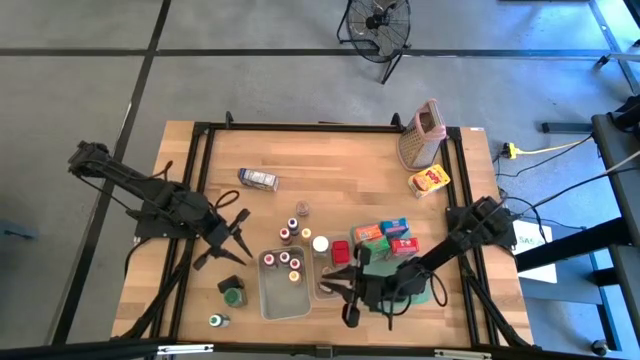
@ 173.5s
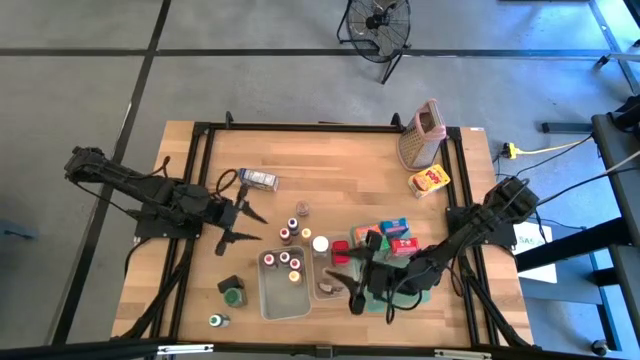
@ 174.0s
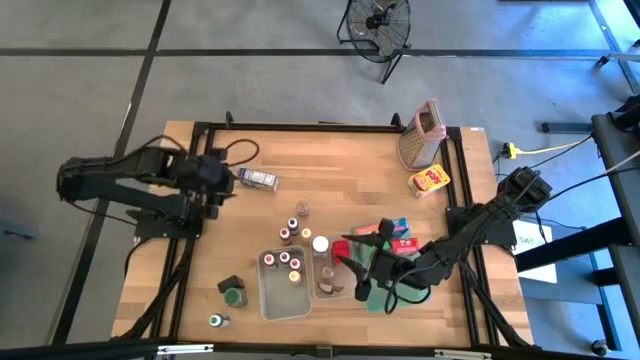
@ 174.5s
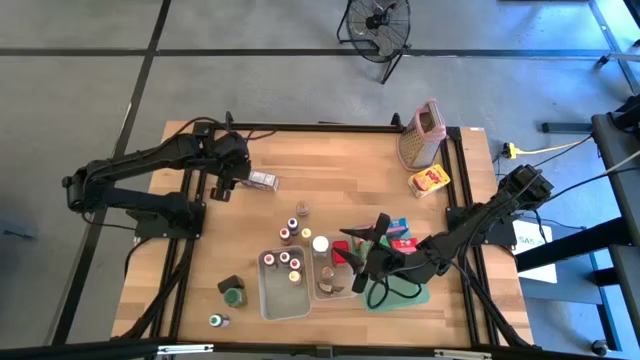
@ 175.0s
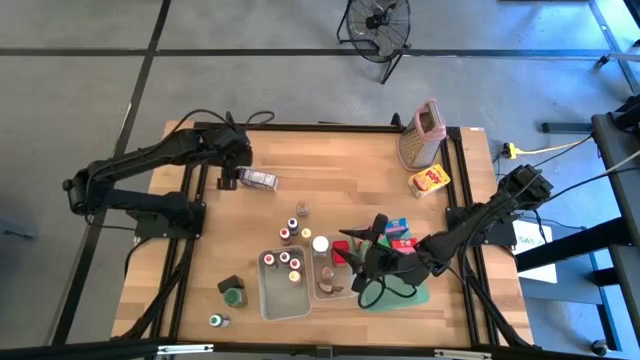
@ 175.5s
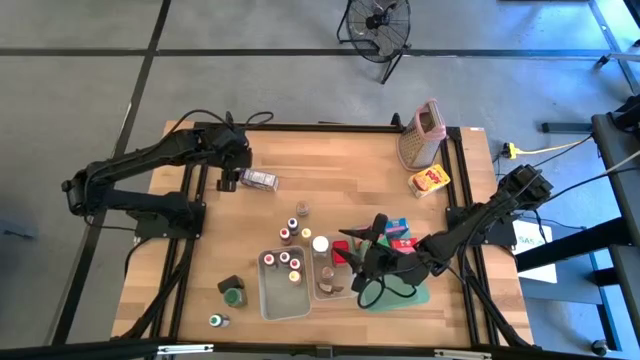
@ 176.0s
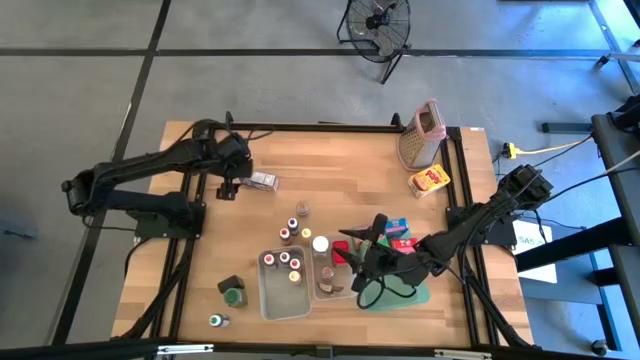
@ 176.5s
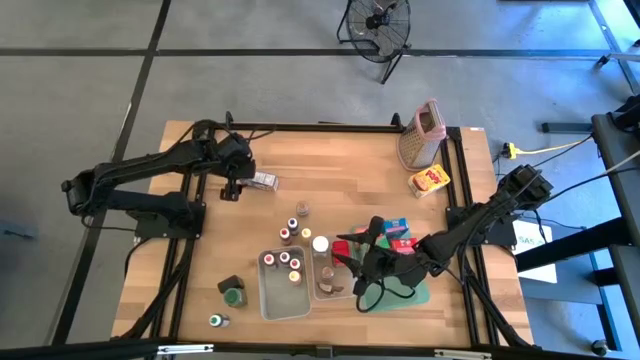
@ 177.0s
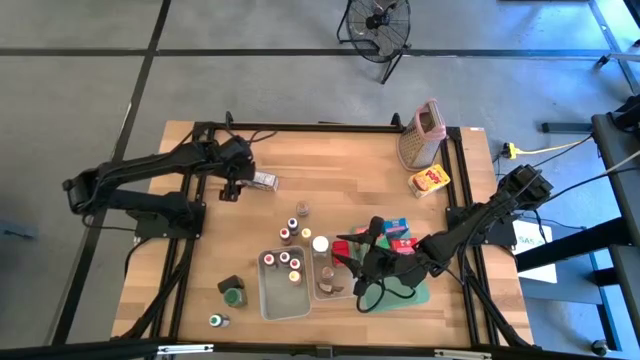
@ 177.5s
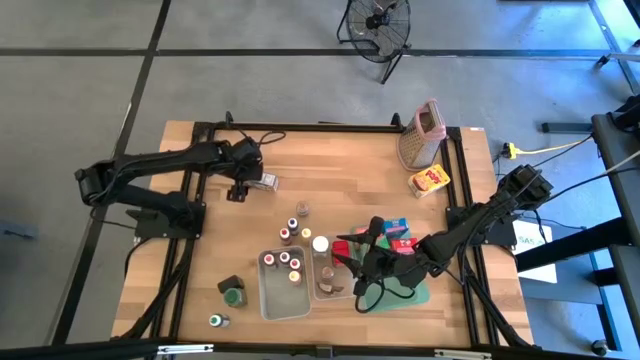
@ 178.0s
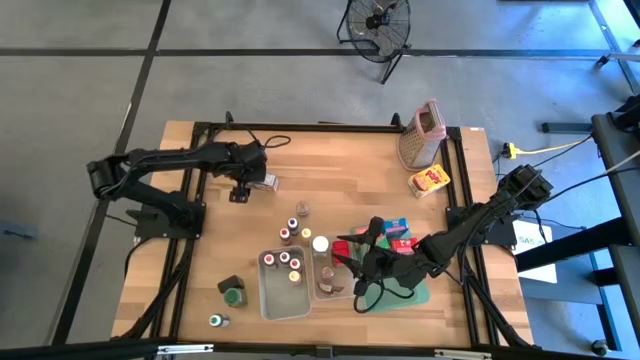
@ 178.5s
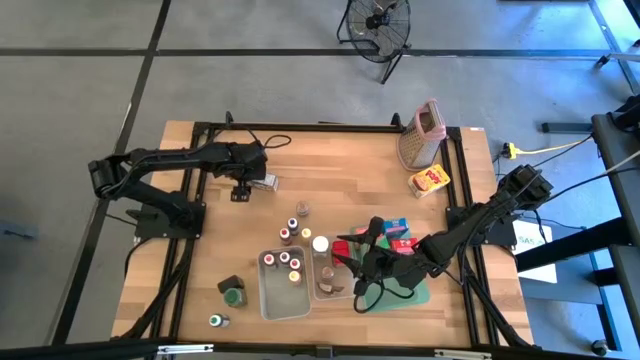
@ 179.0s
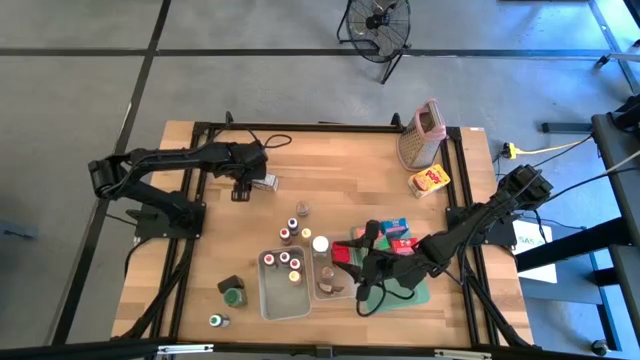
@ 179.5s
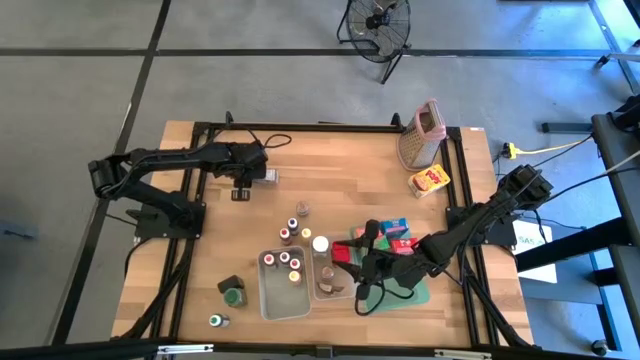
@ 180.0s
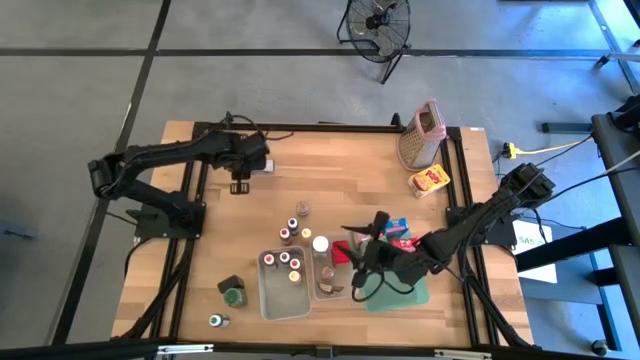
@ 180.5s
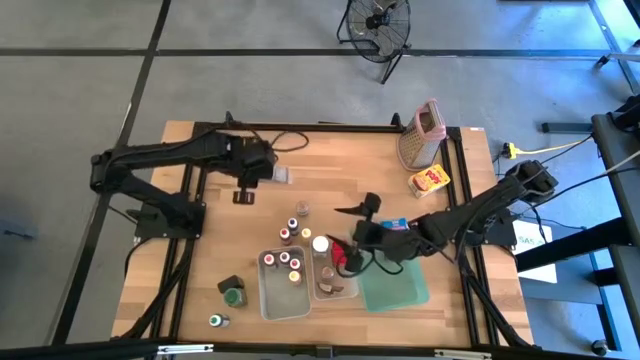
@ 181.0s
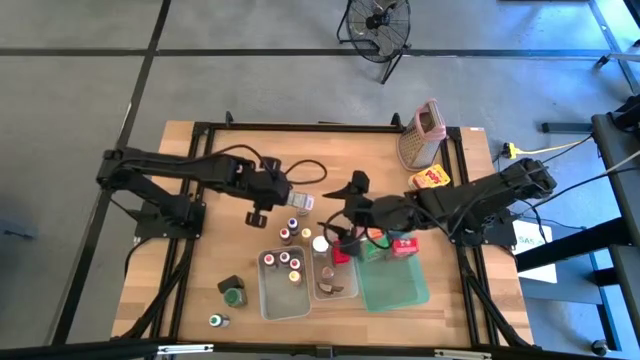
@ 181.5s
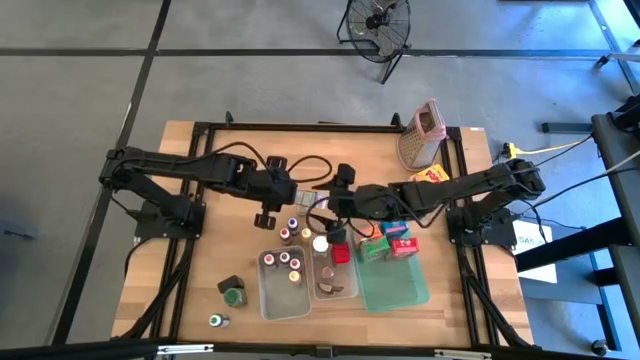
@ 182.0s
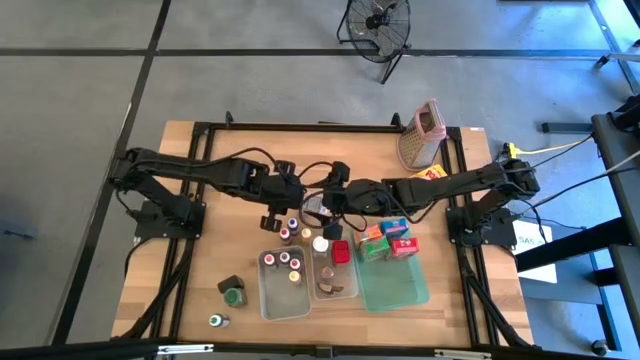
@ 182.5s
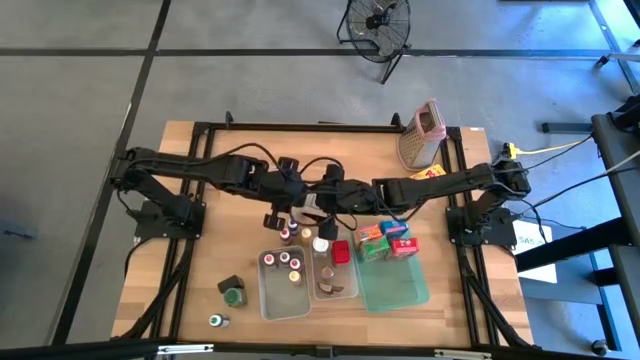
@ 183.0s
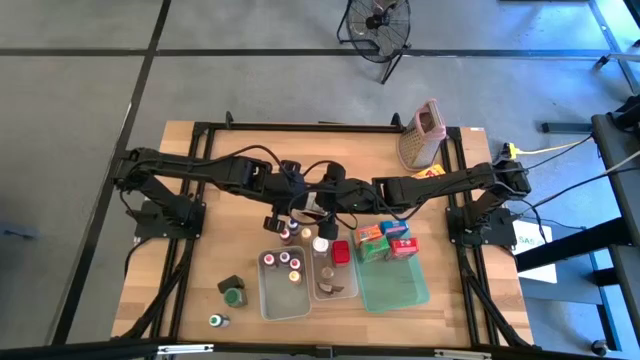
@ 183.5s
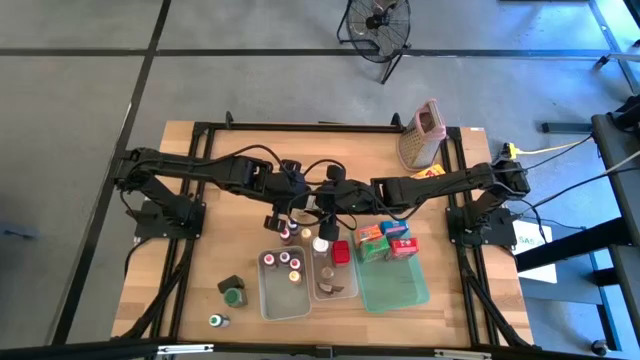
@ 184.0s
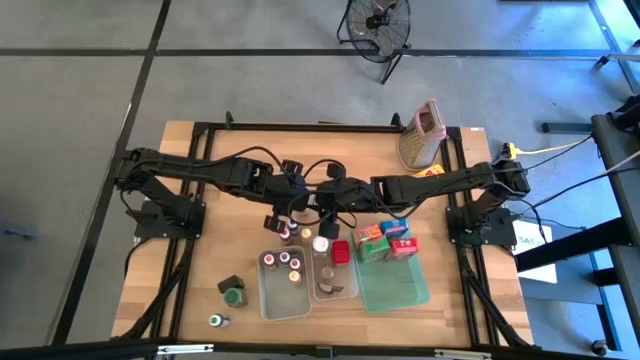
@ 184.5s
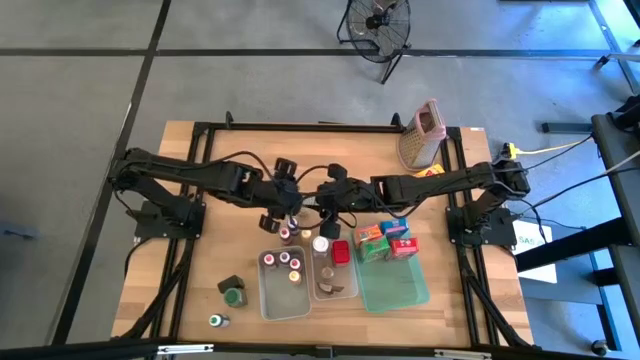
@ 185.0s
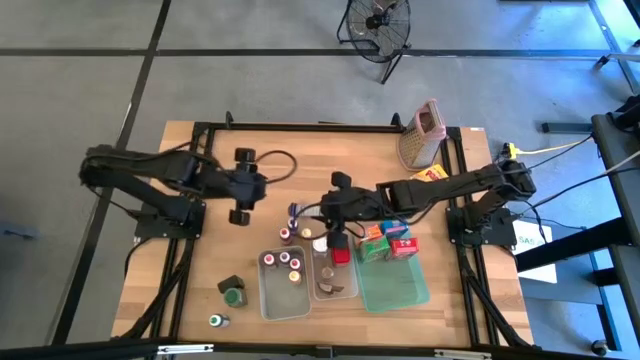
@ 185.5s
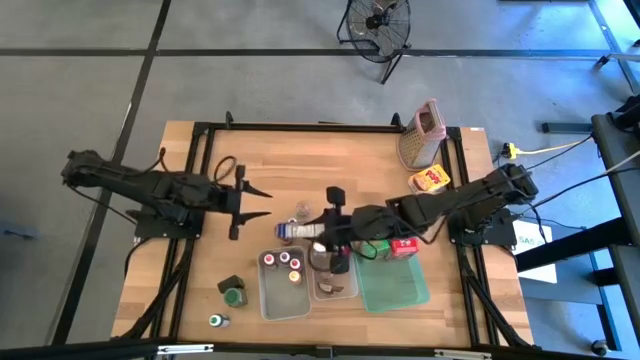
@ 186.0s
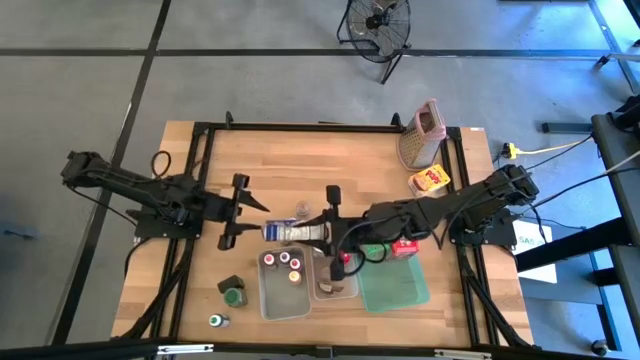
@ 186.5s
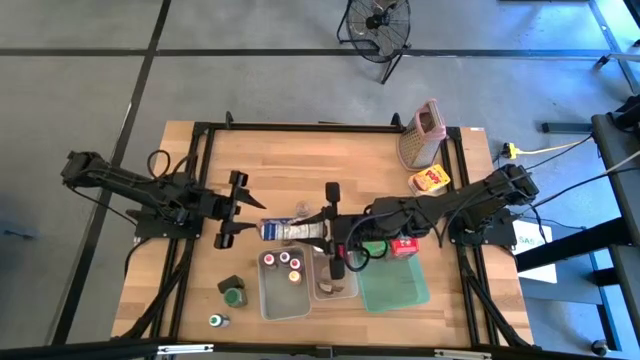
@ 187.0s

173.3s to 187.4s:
Task: Pick & Place Kitchen Items
Put the blue cereal box into the blue bin

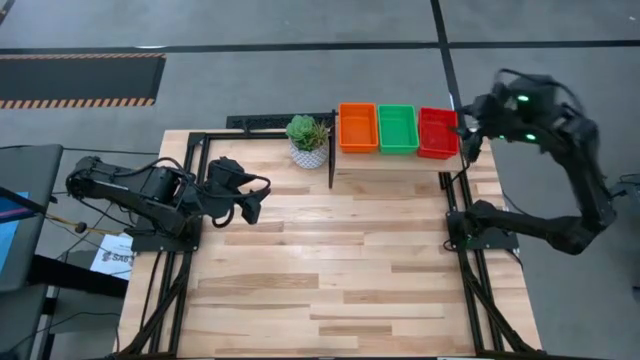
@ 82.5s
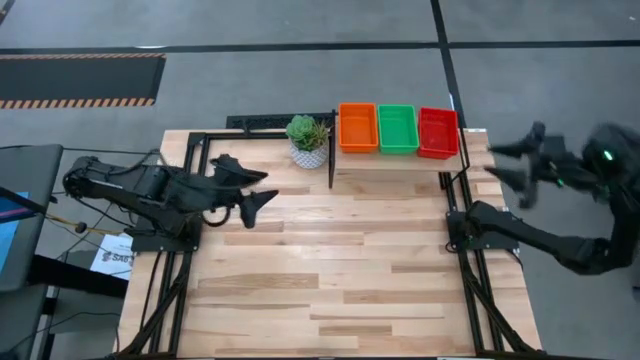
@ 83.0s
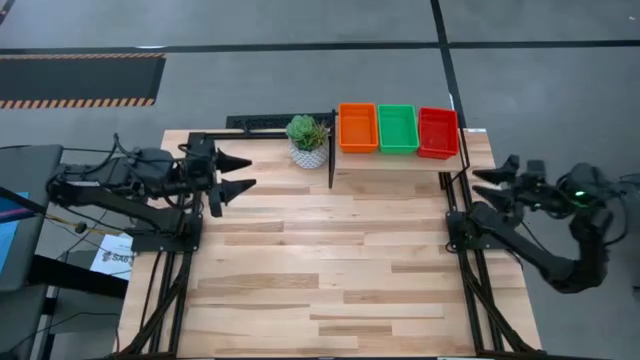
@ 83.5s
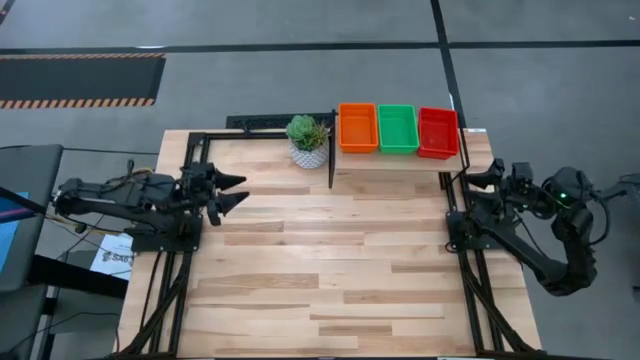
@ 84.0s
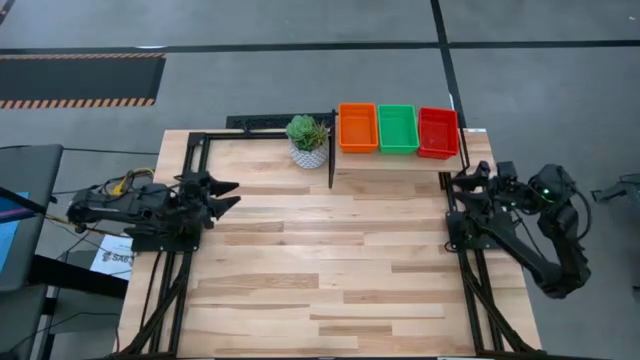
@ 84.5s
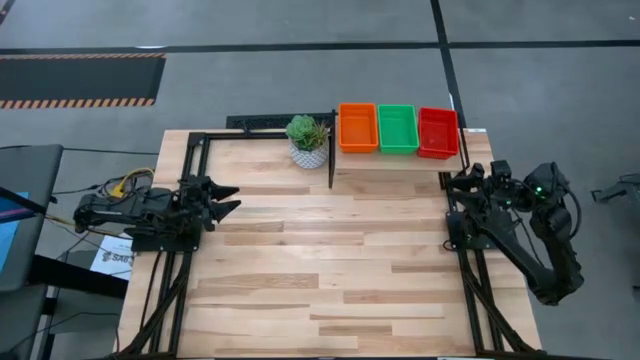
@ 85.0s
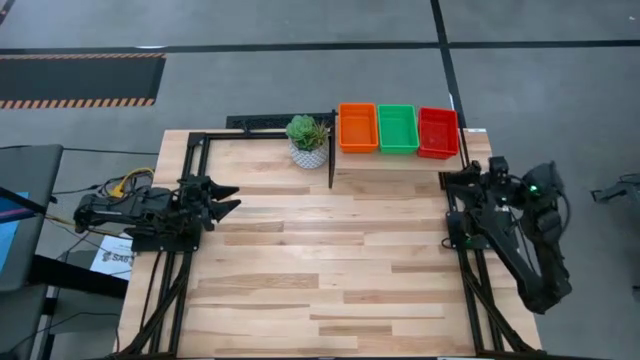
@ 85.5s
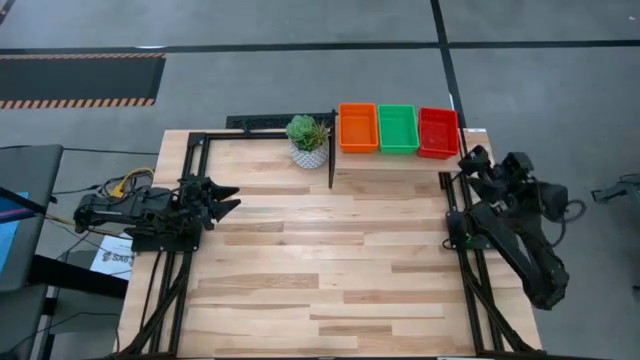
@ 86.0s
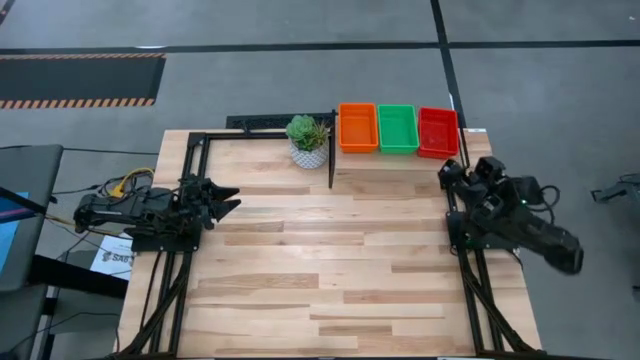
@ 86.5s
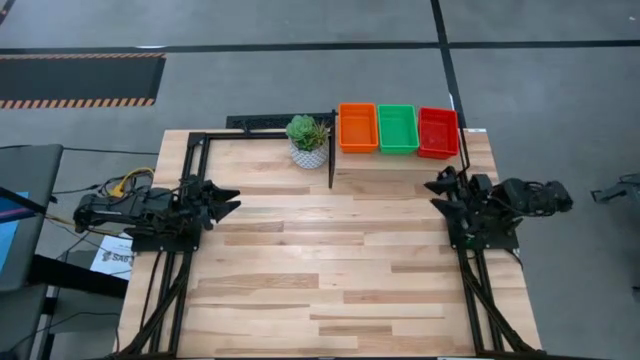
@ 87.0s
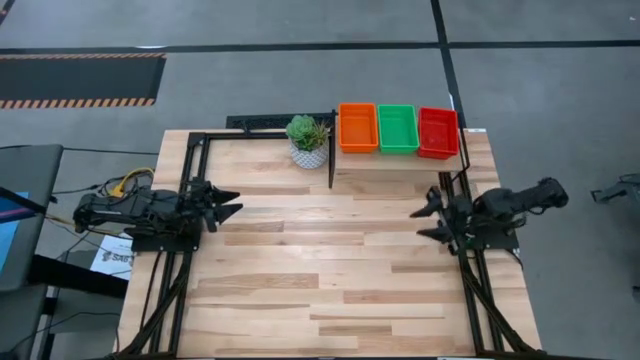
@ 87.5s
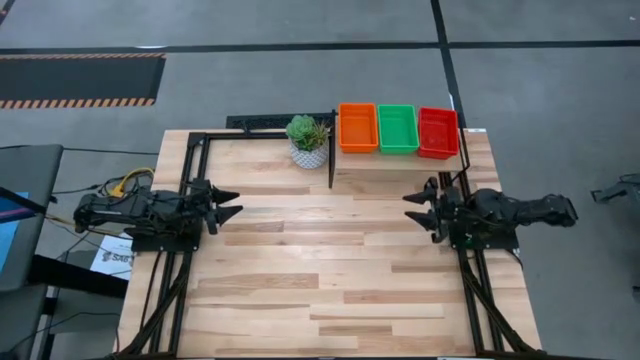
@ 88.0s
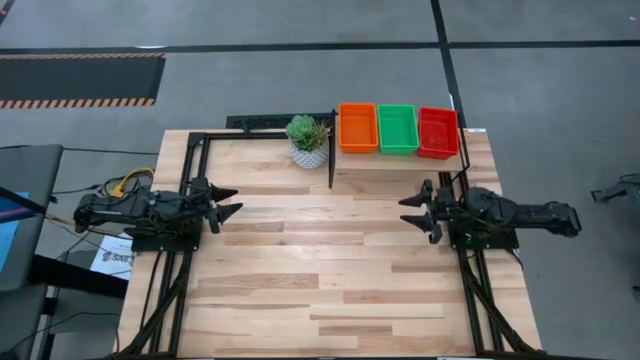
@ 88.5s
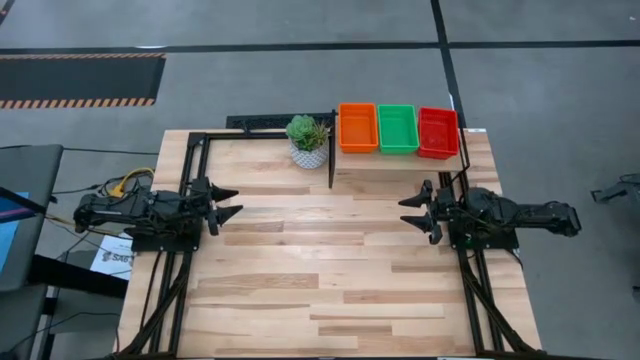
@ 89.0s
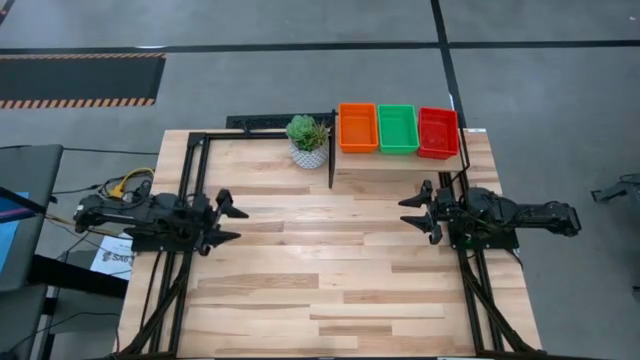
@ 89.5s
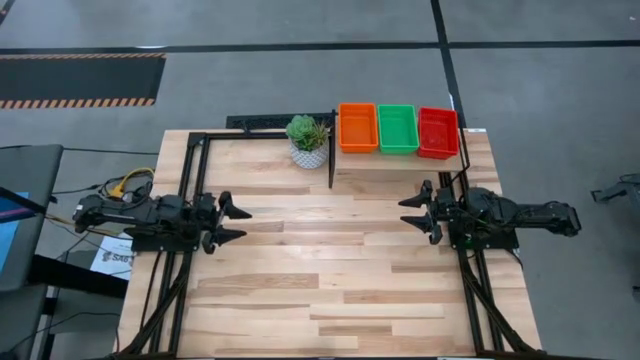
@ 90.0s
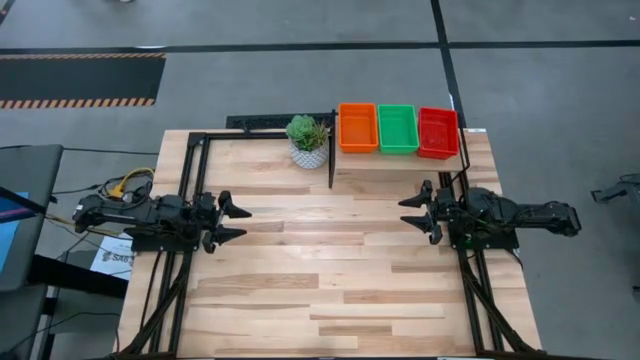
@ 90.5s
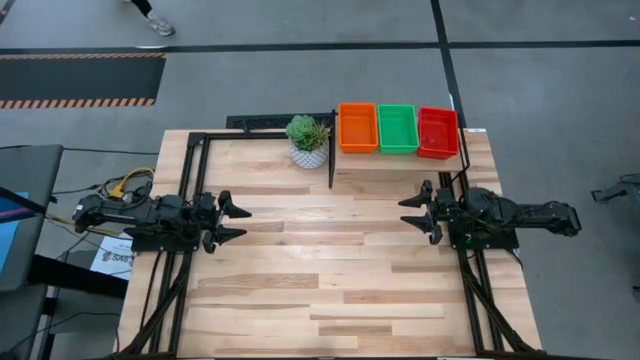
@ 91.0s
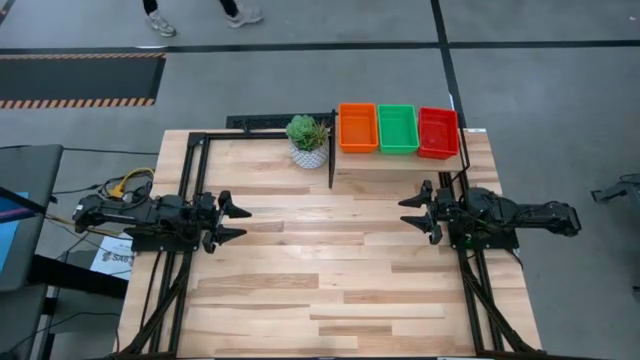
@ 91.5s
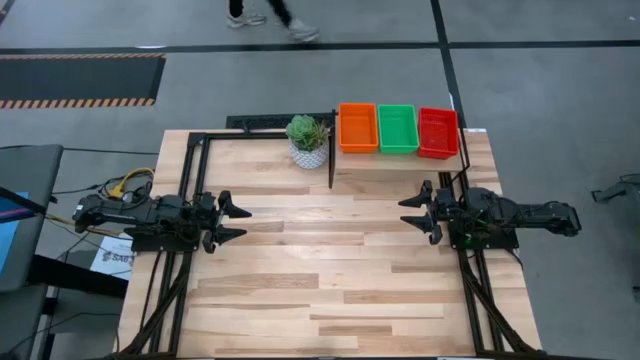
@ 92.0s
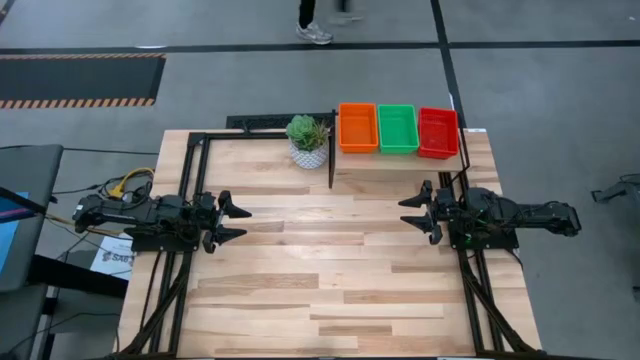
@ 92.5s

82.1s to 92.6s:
Task: Stack baskets on shelf by color
Return to Home Position
